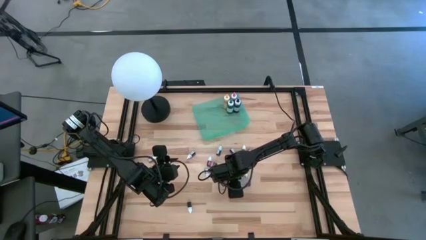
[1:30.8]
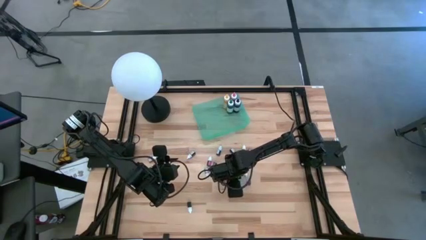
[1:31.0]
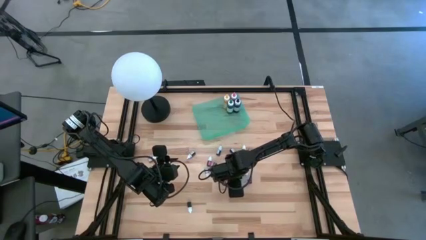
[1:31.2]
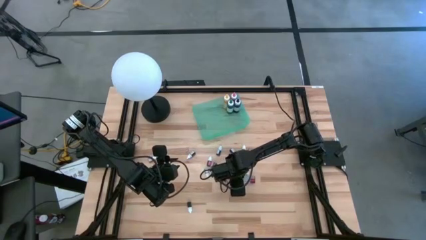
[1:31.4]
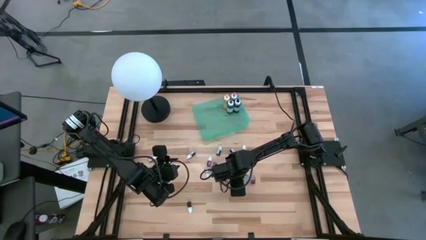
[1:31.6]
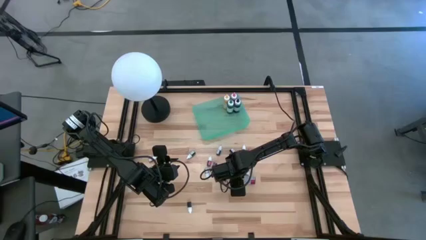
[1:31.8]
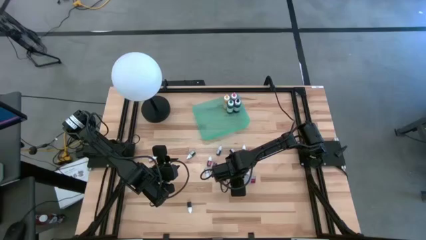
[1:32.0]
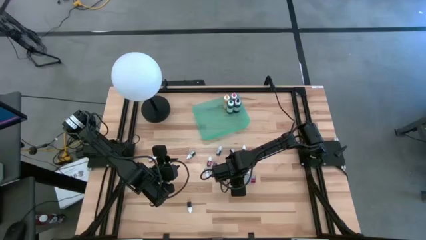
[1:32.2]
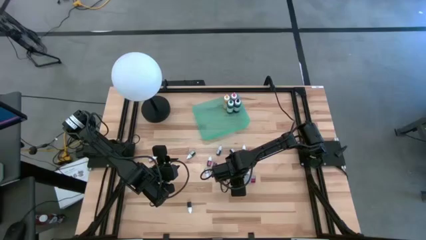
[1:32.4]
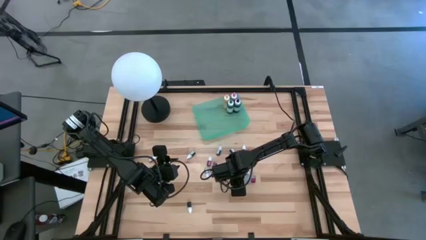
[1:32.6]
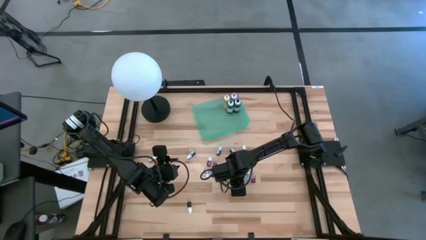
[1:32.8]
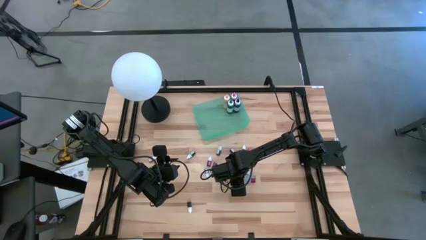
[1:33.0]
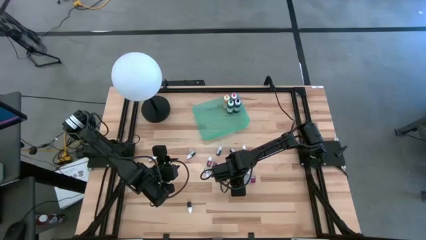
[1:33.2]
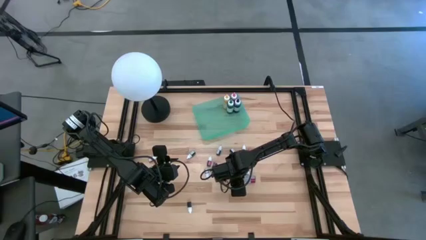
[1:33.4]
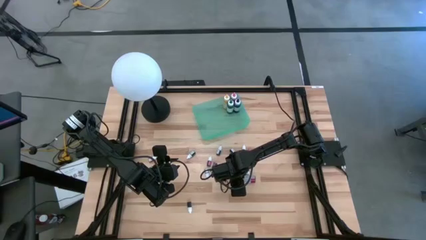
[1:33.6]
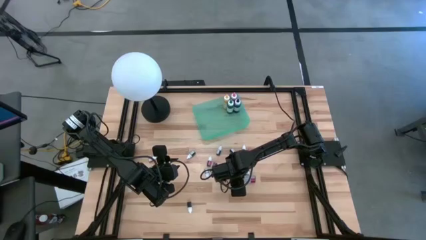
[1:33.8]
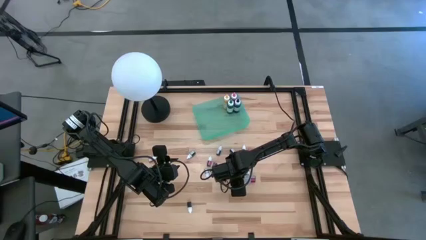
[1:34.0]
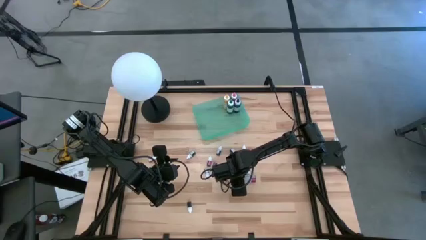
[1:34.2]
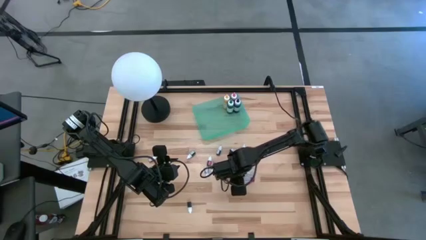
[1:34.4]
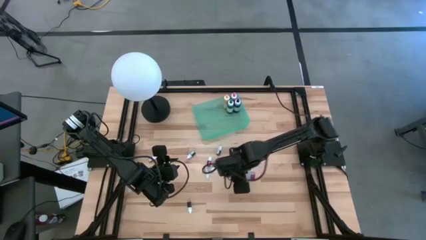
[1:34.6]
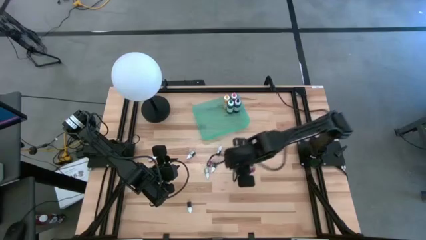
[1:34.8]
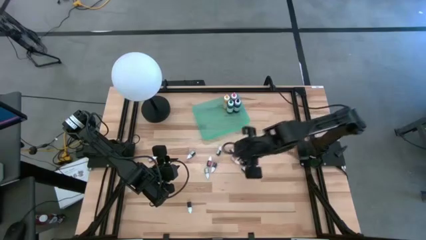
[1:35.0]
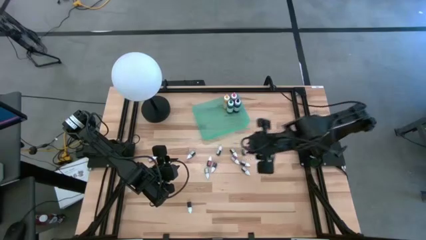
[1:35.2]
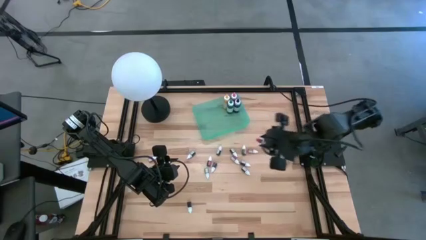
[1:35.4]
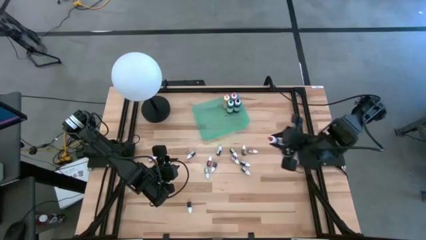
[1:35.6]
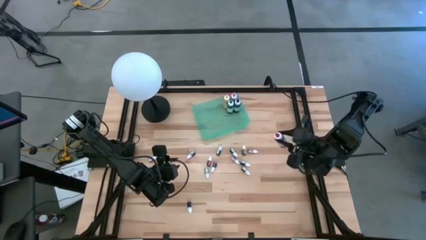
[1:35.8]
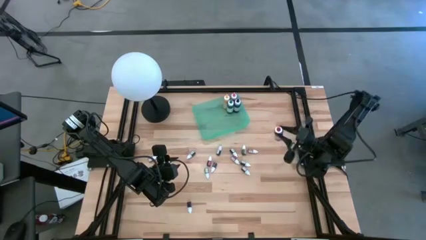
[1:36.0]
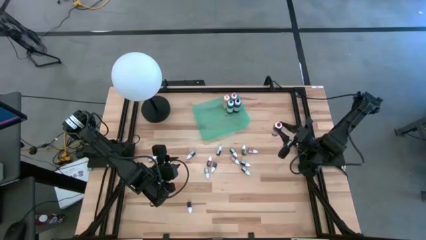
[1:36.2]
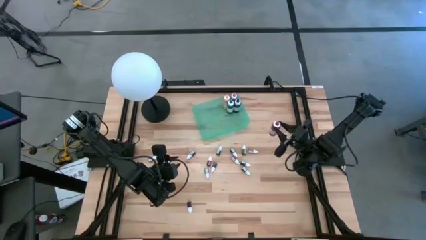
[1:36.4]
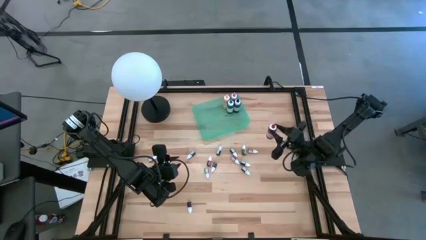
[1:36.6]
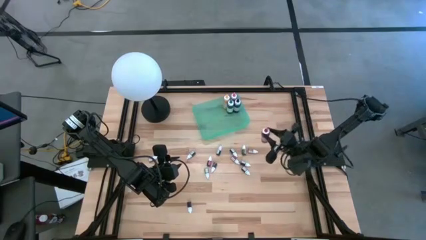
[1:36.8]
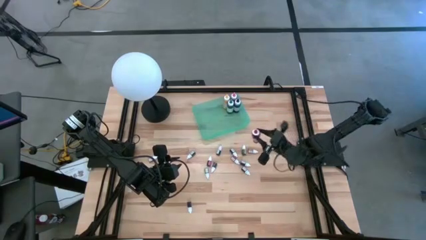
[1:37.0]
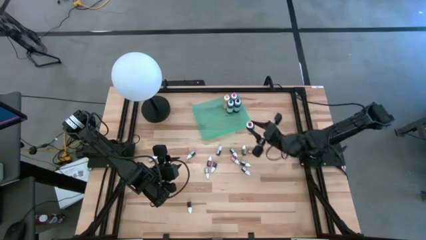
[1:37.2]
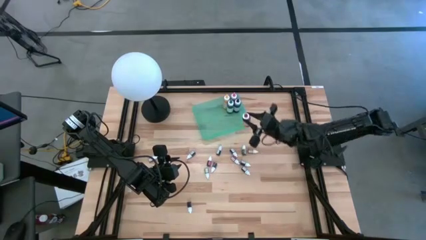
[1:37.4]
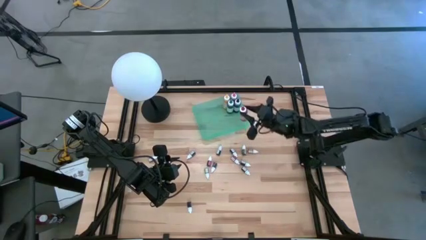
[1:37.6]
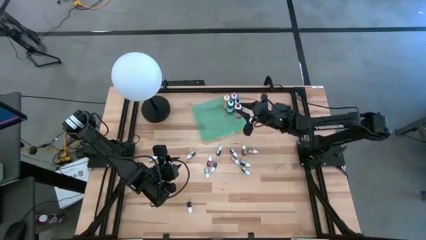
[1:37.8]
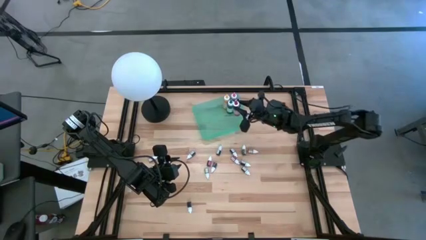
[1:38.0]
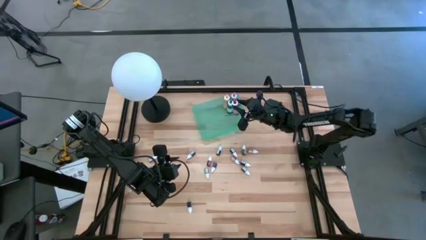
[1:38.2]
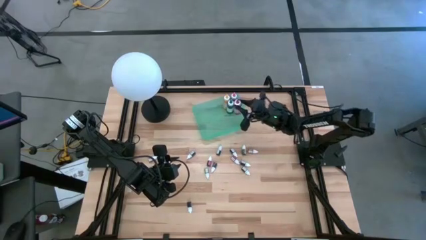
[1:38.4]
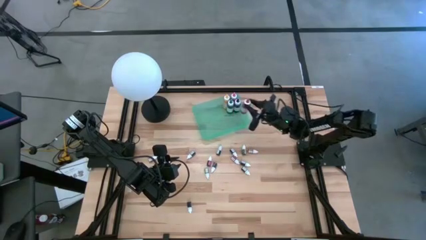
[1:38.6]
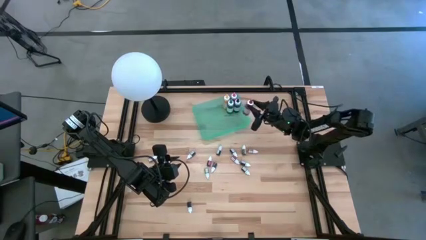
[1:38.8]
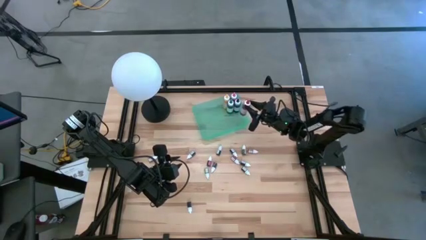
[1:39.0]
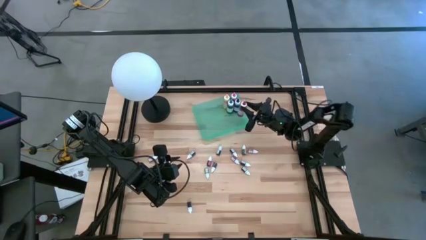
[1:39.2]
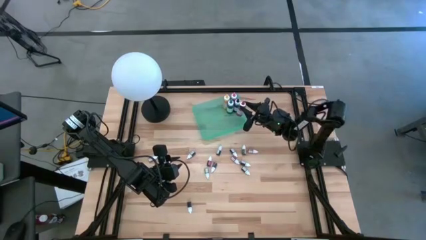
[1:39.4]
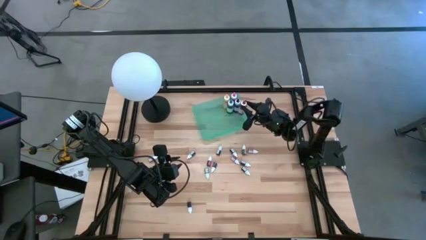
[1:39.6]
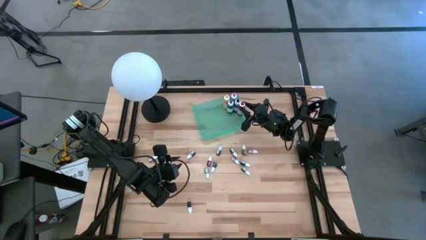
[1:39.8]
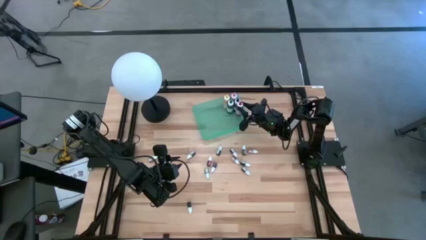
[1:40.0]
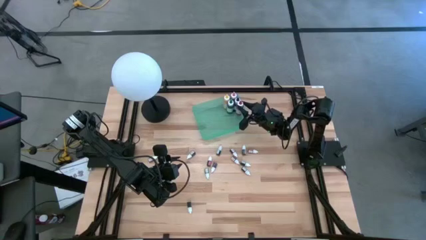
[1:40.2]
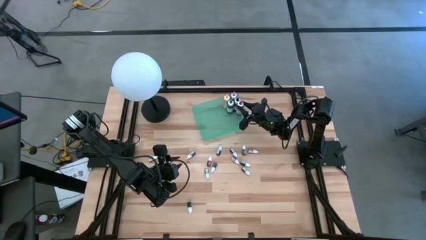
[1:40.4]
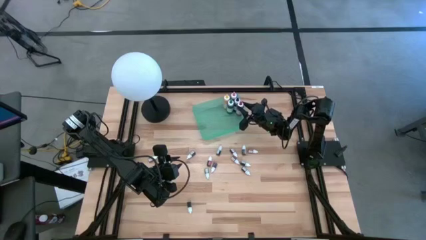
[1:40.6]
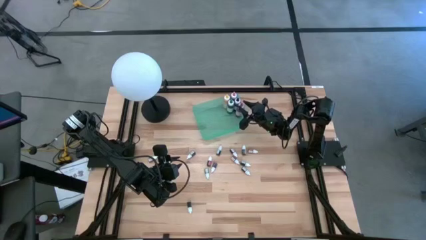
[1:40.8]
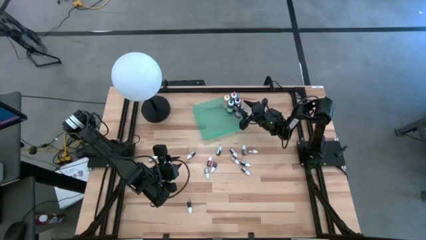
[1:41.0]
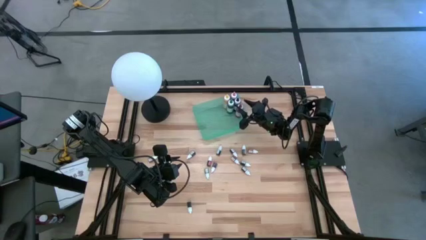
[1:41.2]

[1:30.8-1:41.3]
Task: Pick & Place food coloring
Put the red food coloring bottle into the green bin

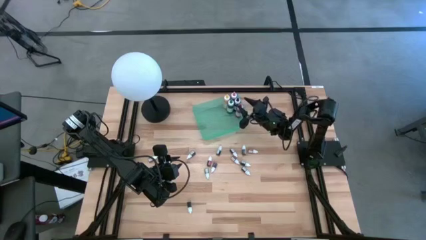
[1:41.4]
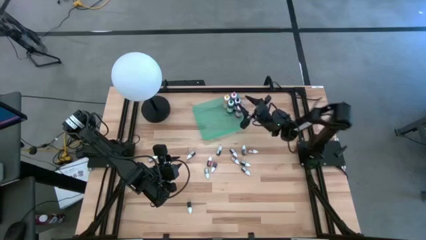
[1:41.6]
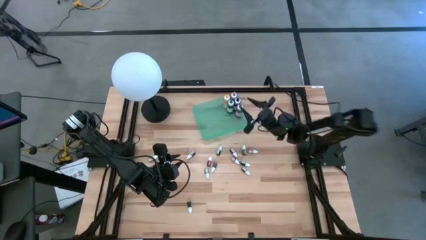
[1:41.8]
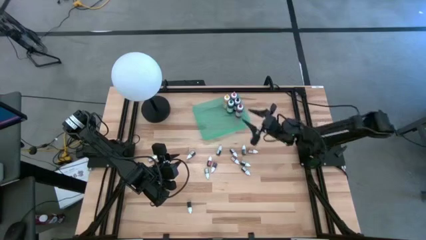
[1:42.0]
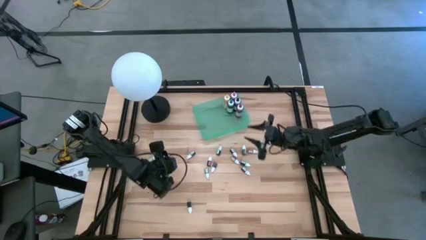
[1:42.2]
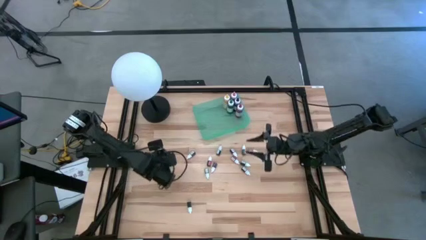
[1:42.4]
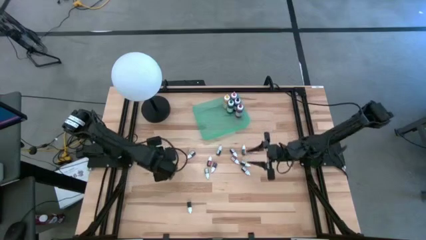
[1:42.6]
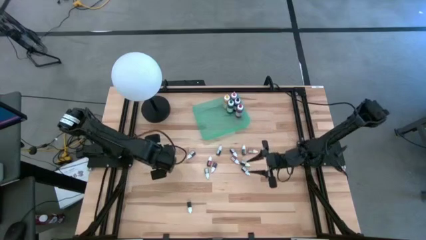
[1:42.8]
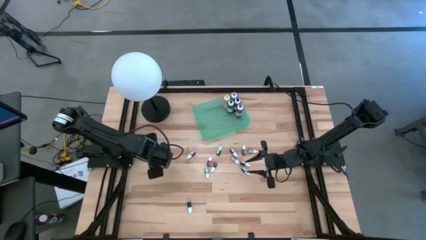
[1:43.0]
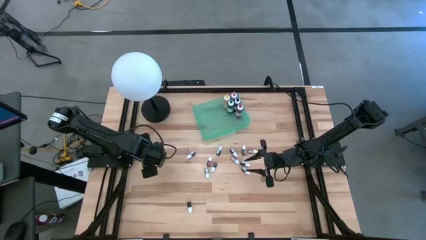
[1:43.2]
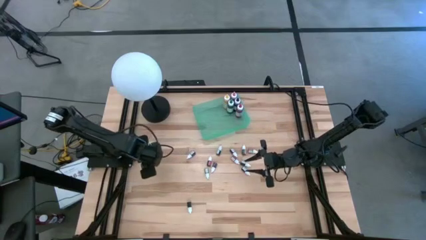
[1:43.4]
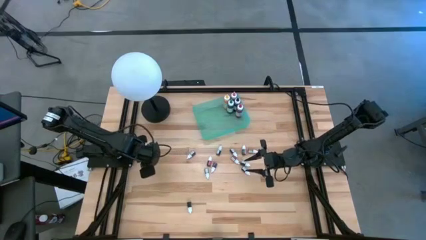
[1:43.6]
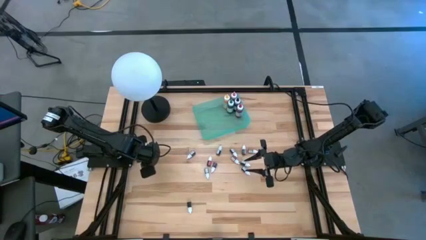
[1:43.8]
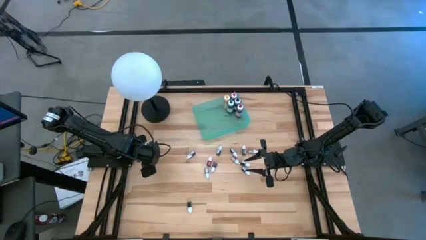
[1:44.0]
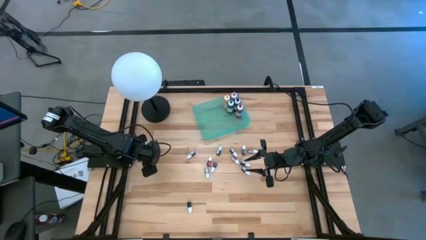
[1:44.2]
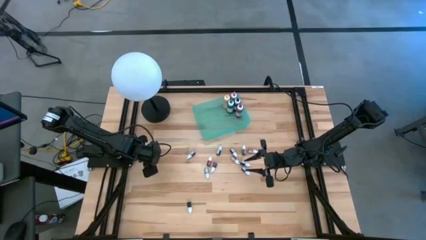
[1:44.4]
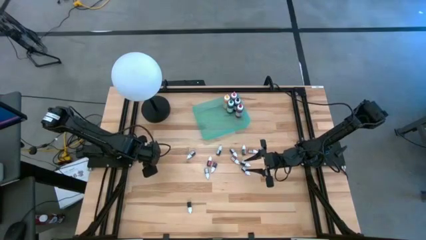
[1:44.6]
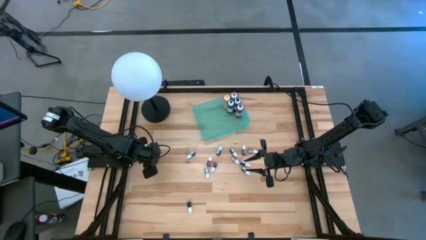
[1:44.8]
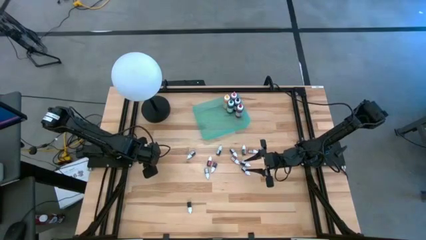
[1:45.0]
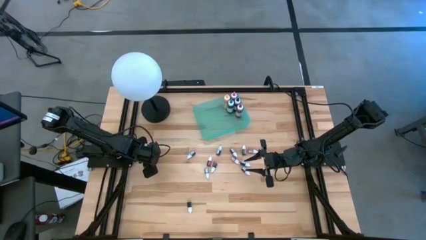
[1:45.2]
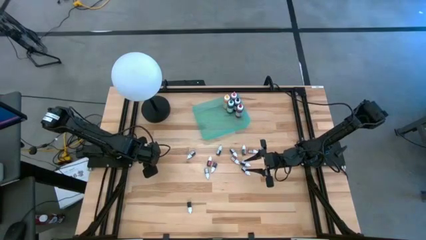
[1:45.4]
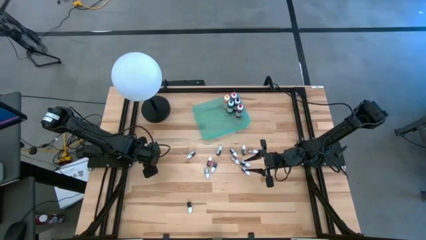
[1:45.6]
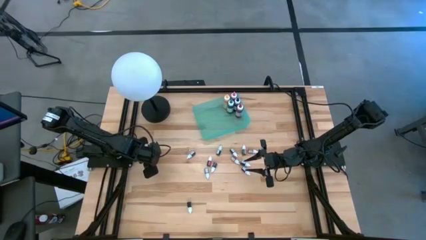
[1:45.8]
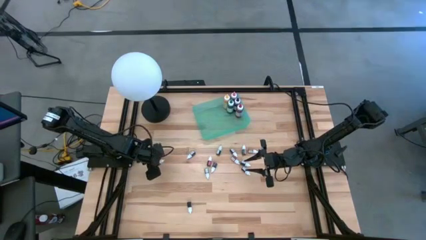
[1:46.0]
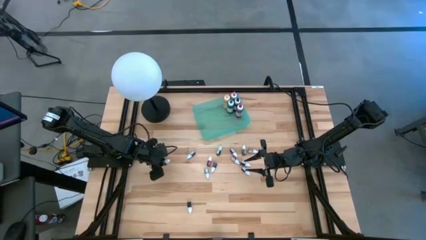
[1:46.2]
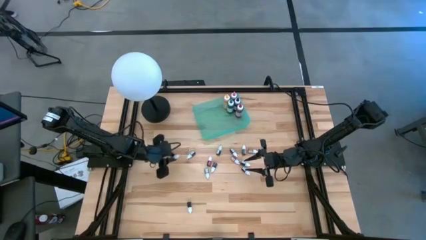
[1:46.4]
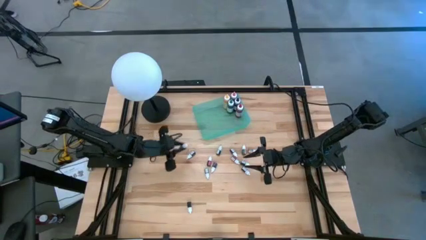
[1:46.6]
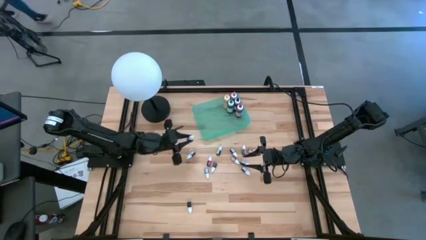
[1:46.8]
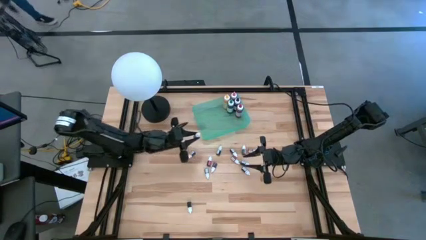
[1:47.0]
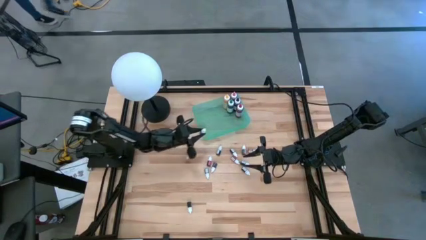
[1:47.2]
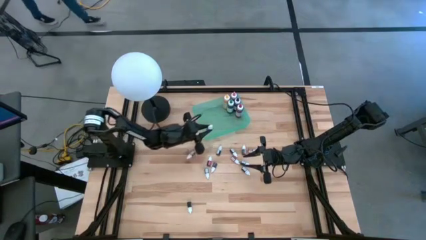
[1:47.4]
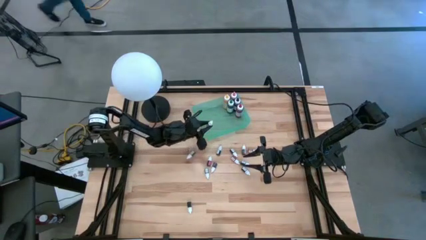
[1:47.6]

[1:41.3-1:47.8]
Put the black food coloring bottle into the green bin
